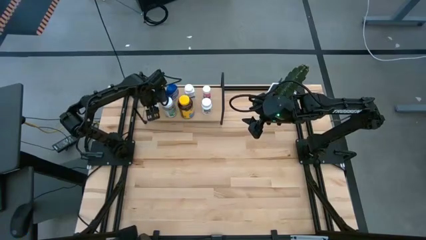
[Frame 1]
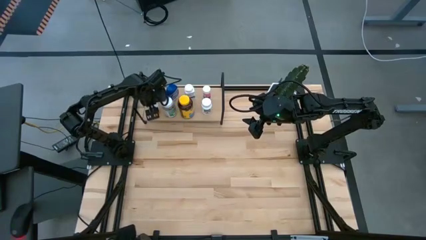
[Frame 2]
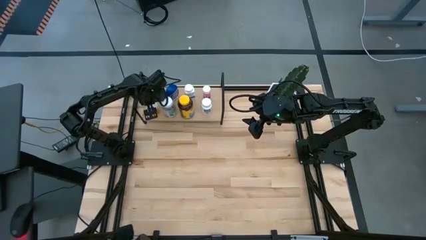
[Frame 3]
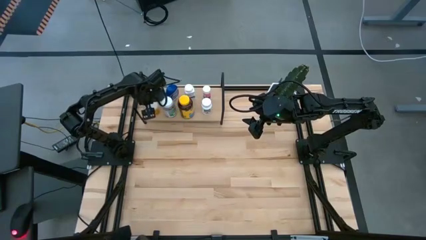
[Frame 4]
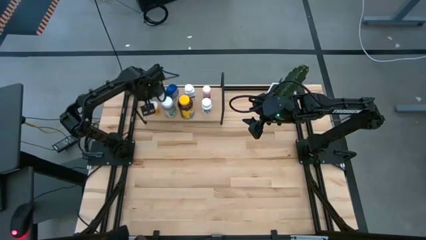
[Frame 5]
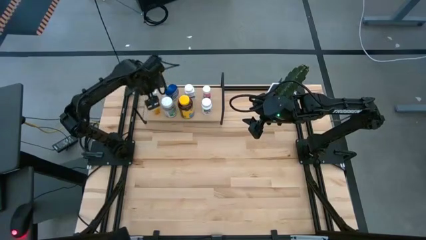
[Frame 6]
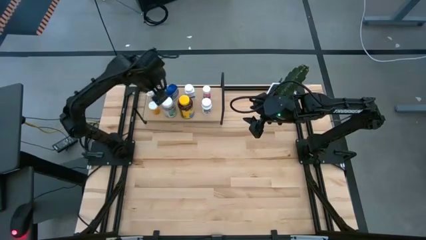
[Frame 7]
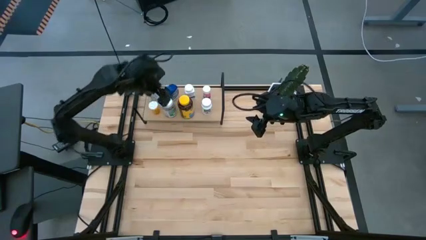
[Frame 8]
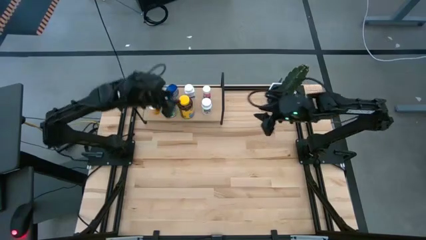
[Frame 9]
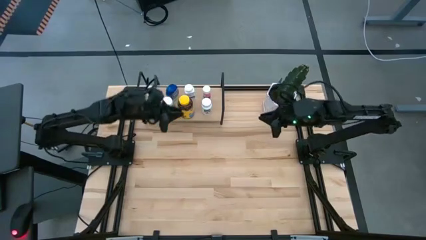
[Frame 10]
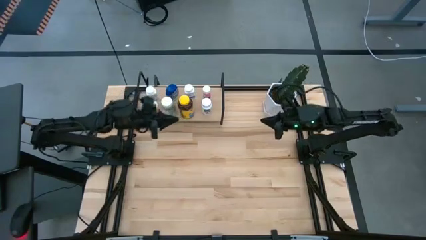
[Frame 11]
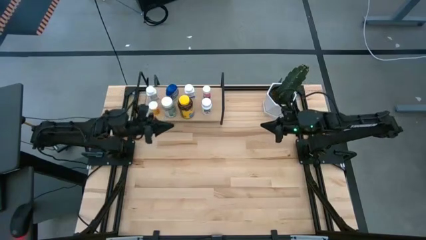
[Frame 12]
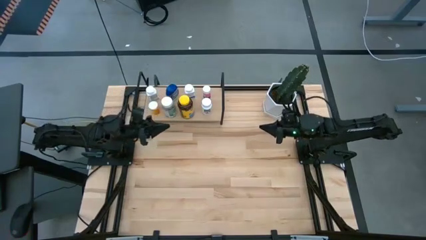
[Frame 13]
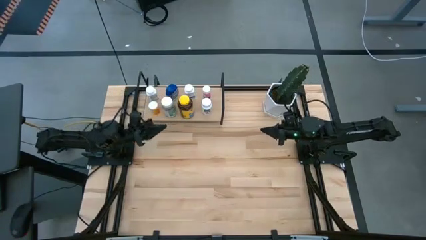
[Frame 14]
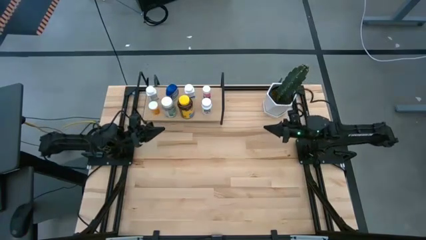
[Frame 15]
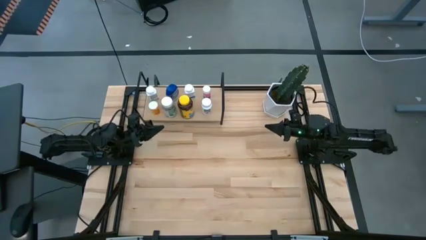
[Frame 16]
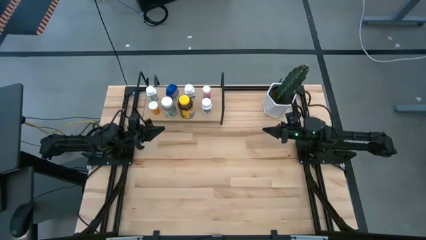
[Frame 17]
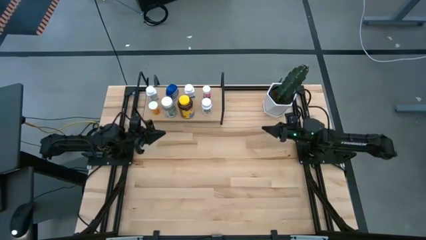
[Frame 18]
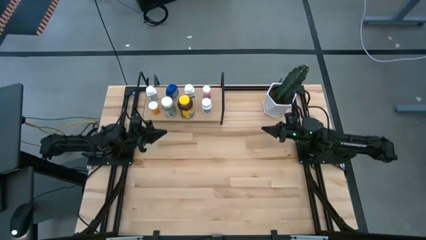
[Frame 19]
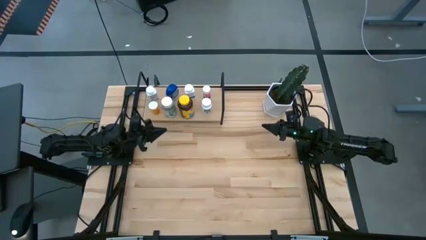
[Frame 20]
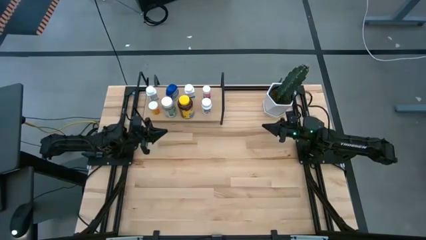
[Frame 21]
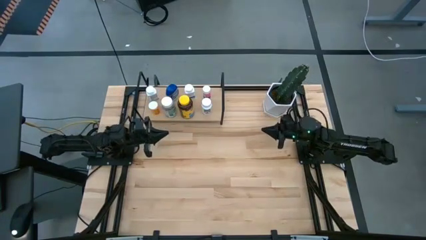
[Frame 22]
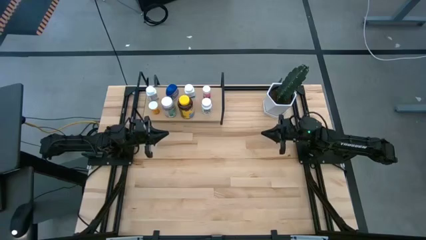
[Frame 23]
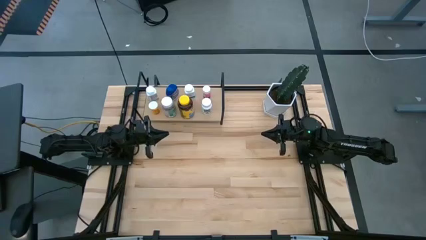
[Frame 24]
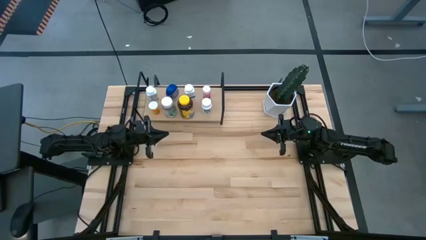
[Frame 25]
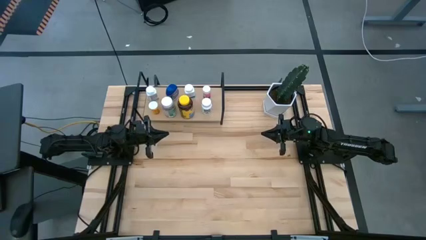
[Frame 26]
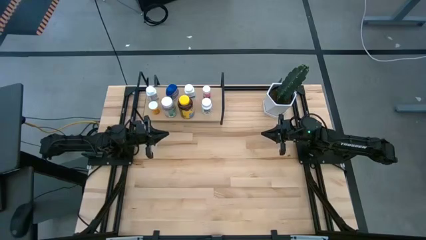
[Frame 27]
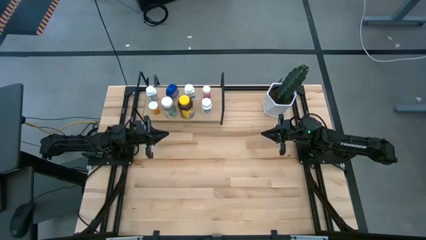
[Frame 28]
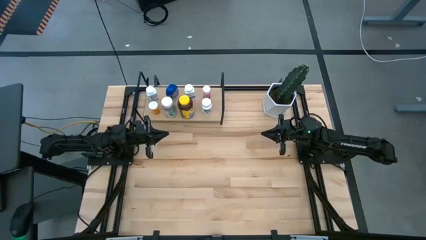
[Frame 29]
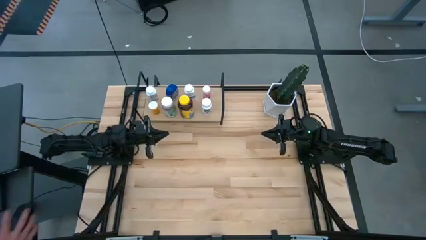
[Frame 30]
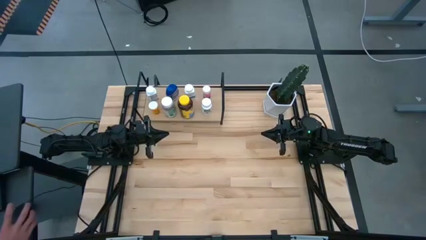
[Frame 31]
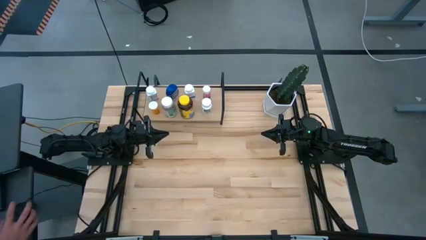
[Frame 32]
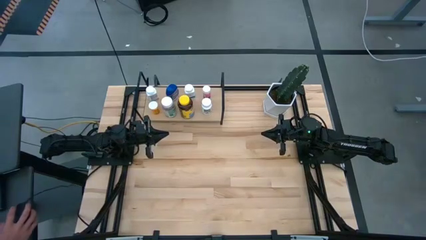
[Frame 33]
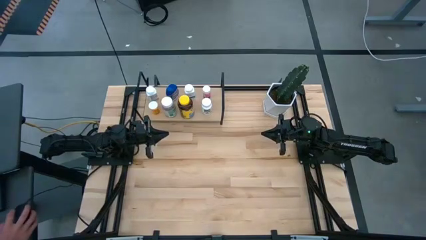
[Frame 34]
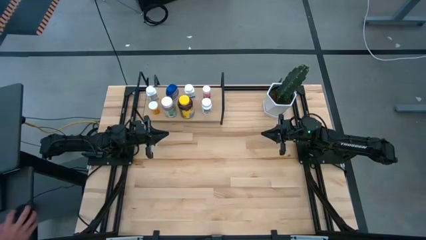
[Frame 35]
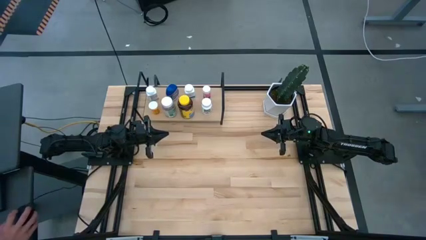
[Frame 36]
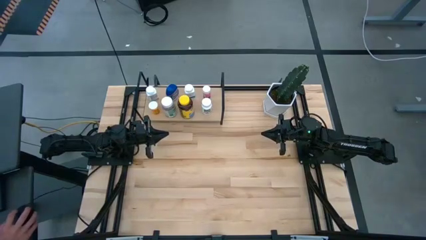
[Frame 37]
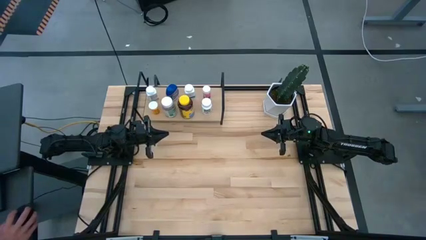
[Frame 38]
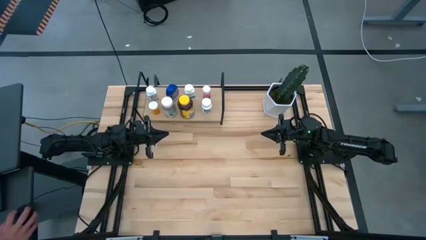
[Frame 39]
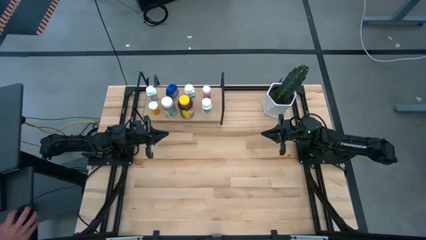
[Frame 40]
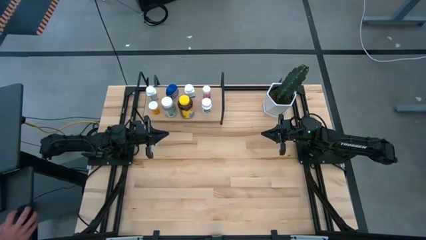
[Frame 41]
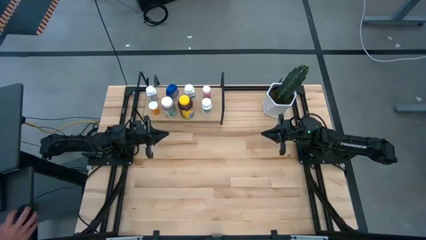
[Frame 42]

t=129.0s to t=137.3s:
Task: Pick and place medicine bottles onto shelf by color
Return to Home Position

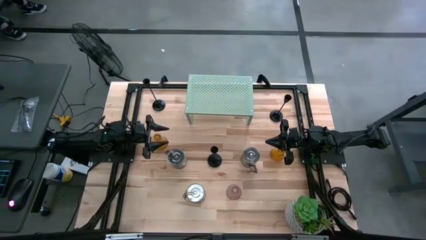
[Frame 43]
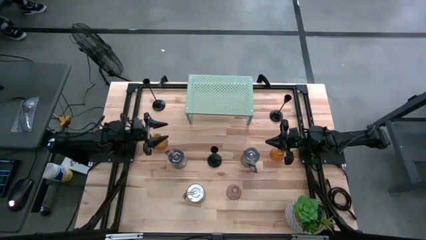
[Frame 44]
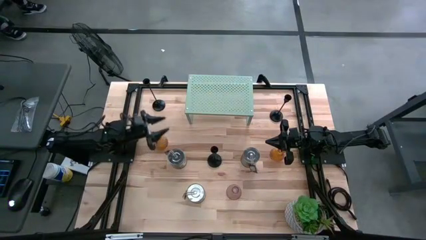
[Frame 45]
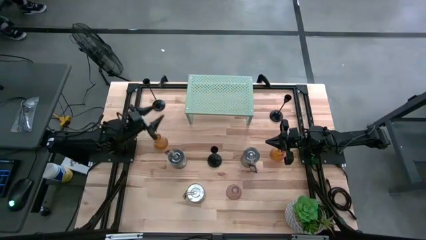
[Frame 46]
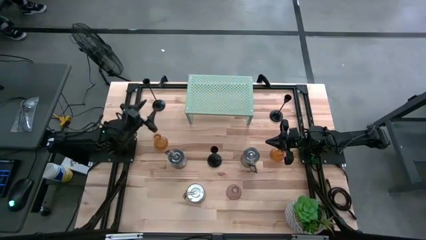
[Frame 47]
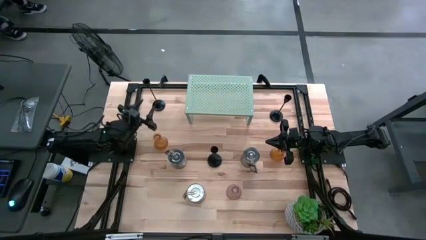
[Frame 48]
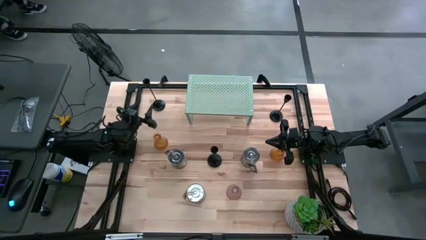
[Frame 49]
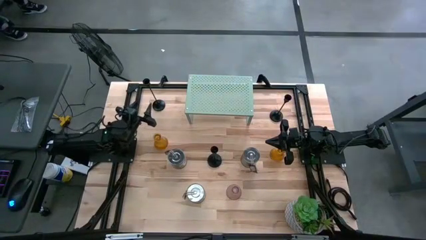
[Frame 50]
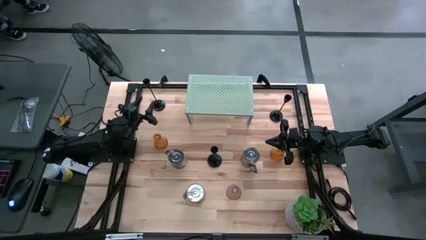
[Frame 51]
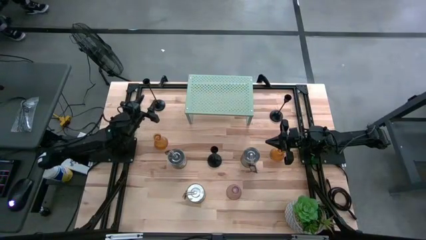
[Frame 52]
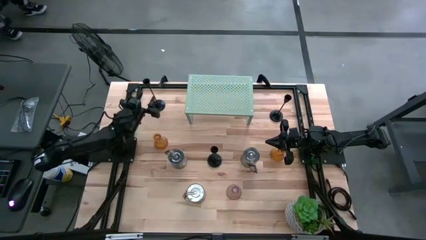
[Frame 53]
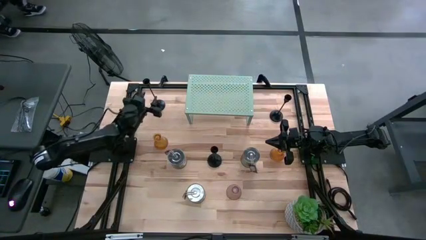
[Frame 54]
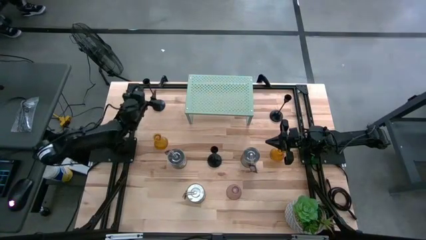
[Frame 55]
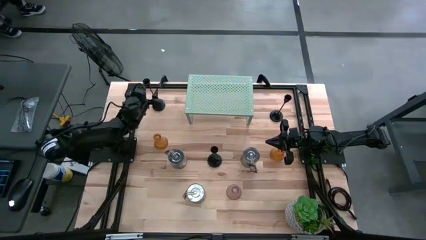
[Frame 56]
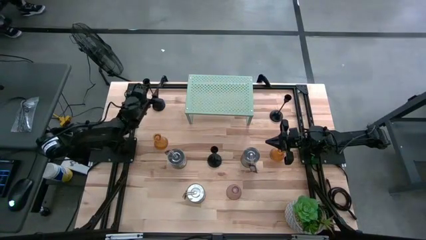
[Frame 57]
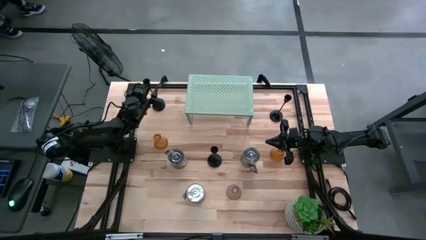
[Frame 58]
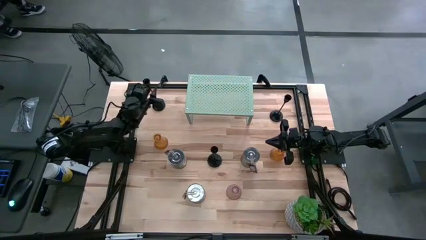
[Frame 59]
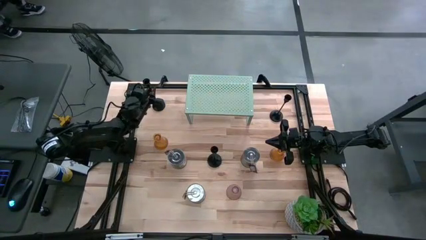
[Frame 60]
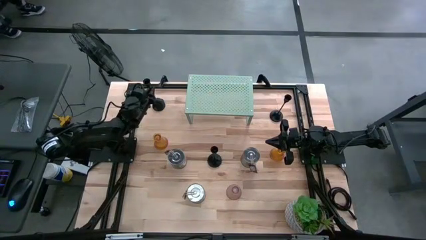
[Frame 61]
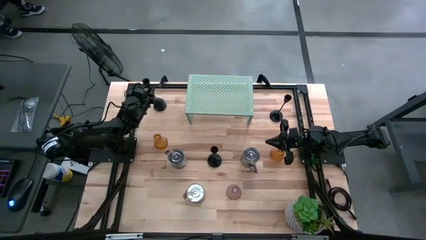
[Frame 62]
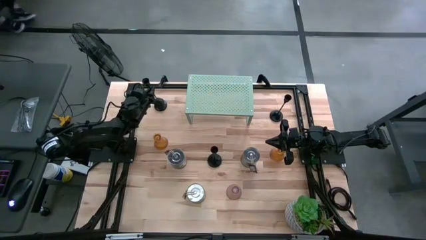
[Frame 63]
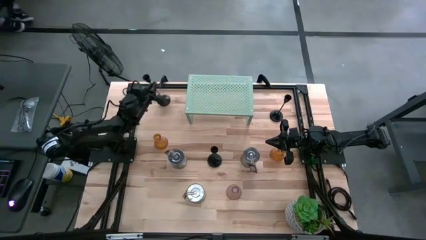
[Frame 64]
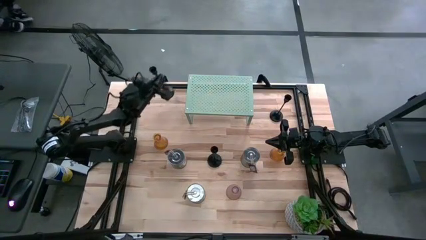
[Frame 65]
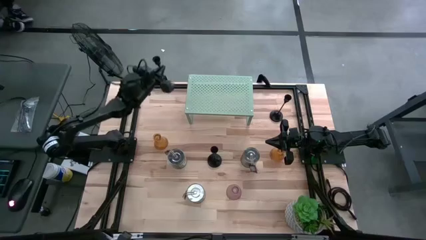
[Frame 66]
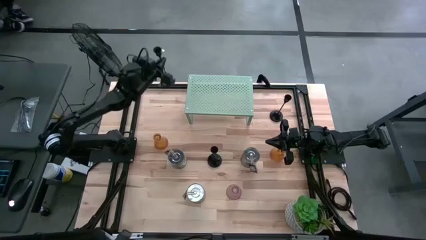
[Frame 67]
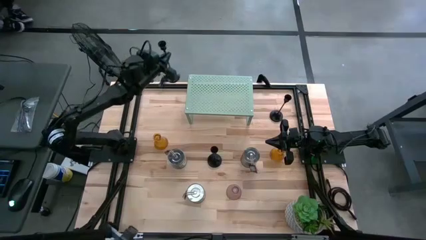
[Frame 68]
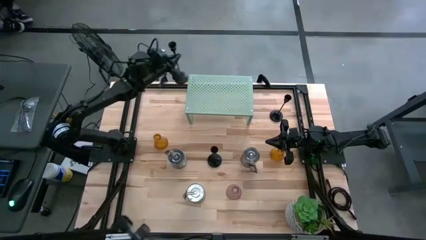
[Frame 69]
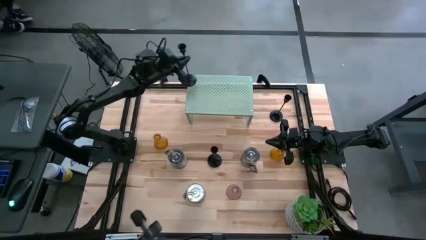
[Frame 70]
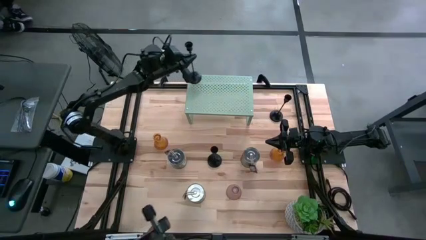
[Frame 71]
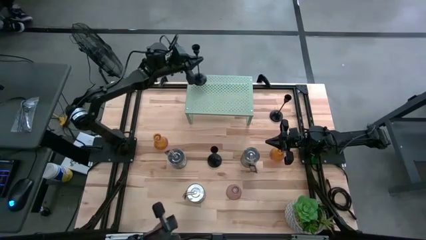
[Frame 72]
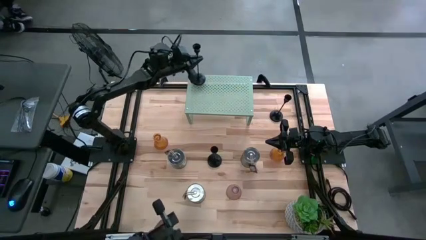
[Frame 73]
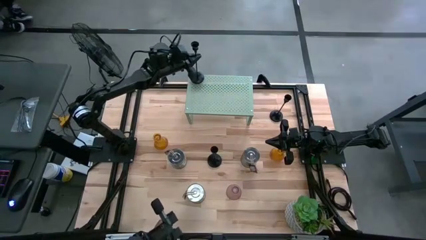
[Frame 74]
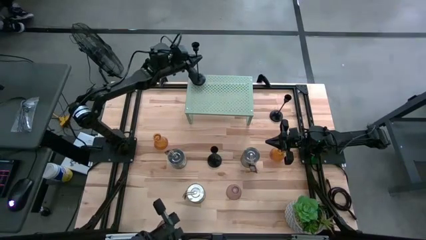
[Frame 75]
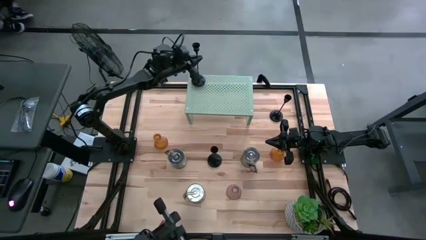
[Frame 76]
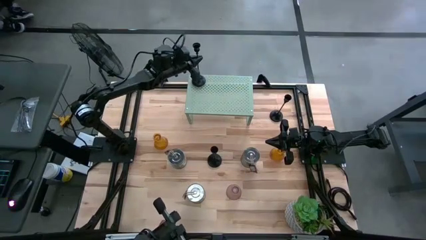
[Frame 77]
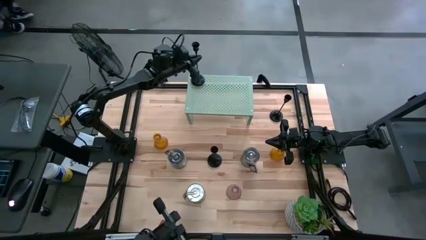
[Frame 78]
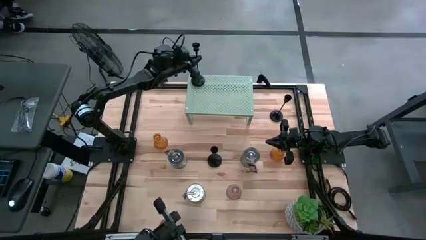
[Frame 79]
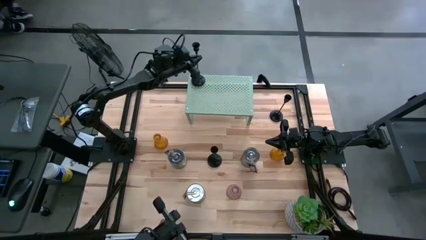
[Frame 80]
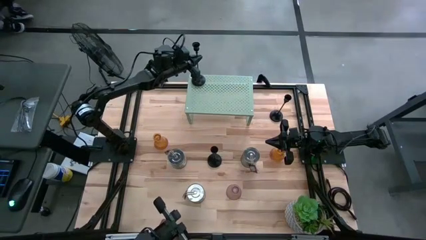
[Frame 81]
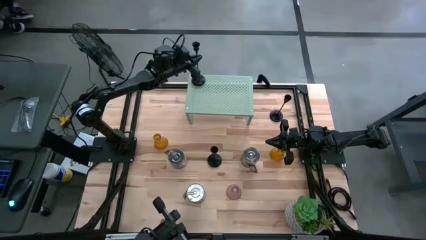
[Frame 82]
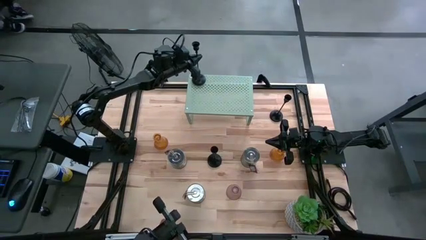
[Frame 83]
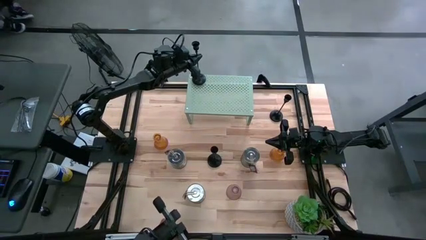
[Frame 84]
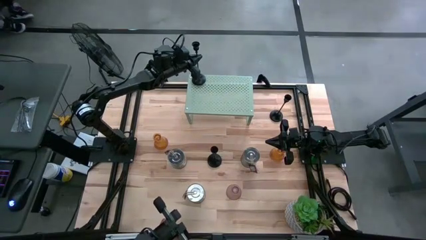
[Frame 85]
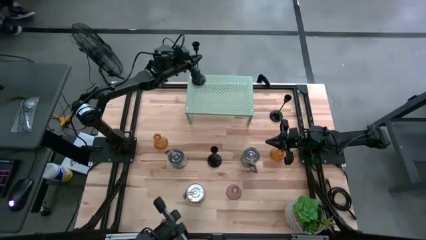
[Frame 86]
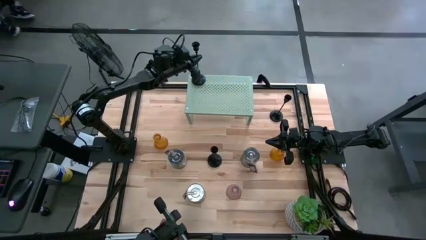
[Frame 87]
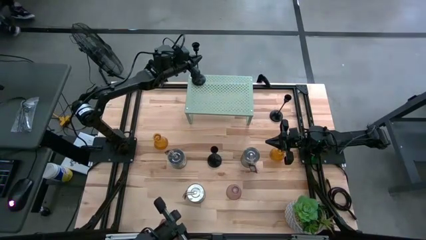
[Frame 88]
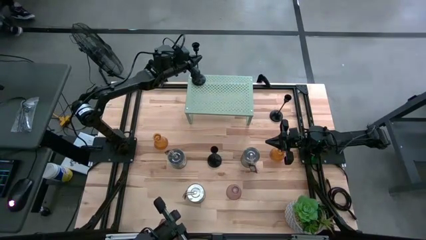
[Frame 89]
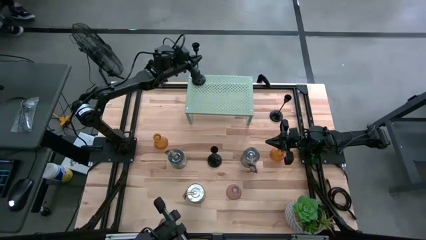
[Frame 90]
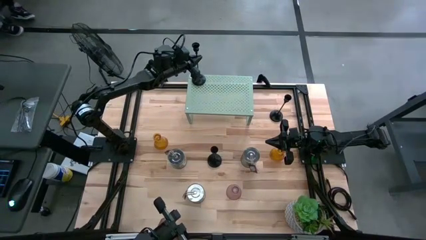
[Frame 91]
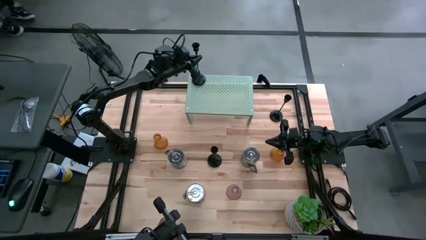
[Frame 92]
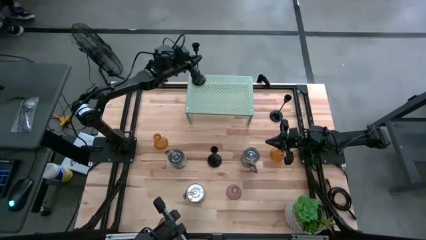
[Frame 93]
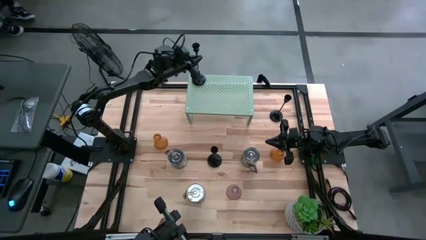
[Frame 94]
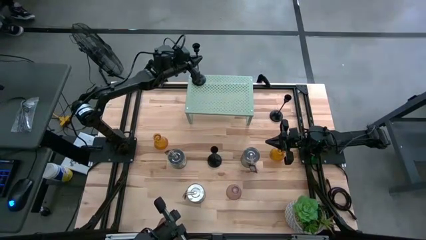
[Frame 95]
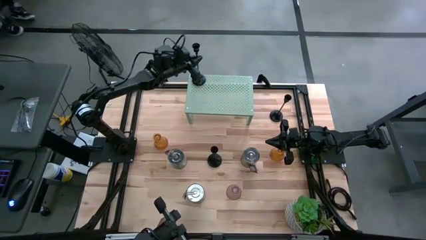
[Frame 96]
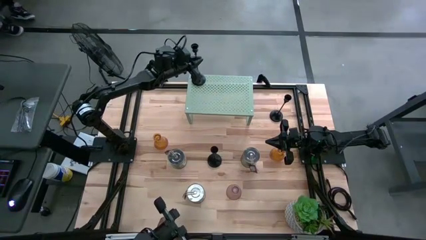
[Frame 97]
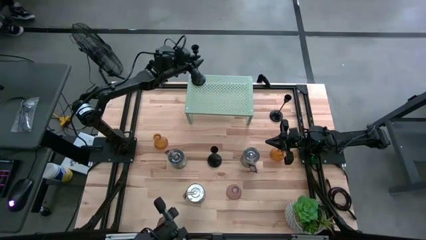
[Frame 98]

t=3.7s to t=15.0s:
Task: Pick & Place candle stick holders
Put the top left black candle holder on the shelf
